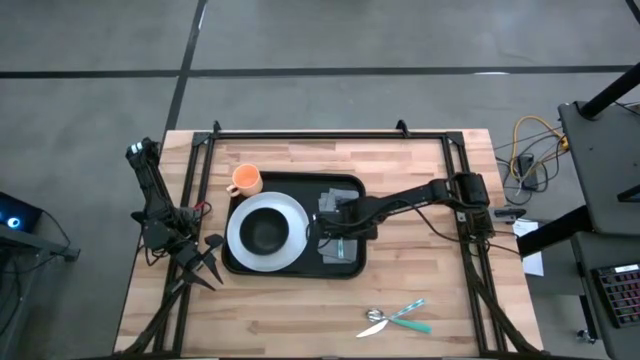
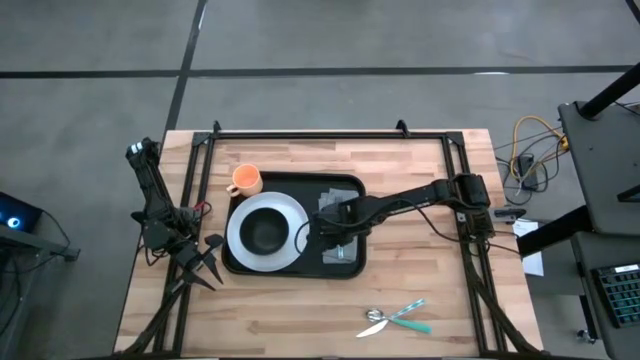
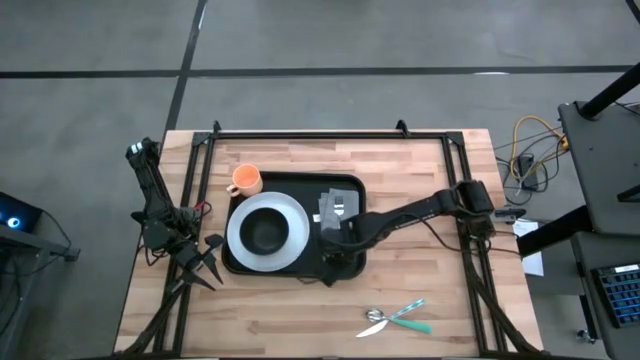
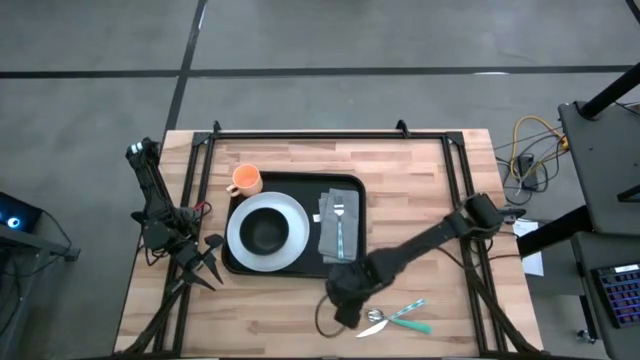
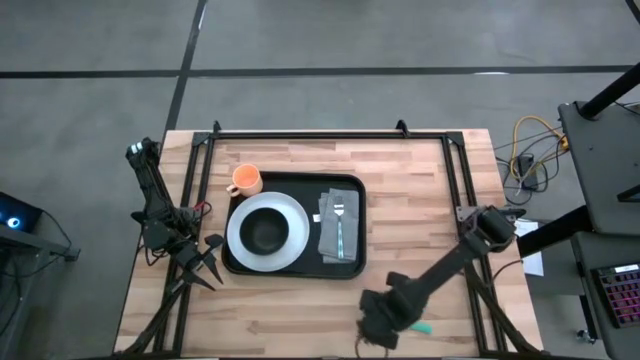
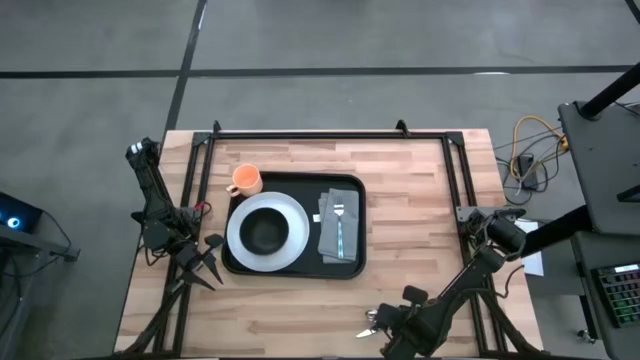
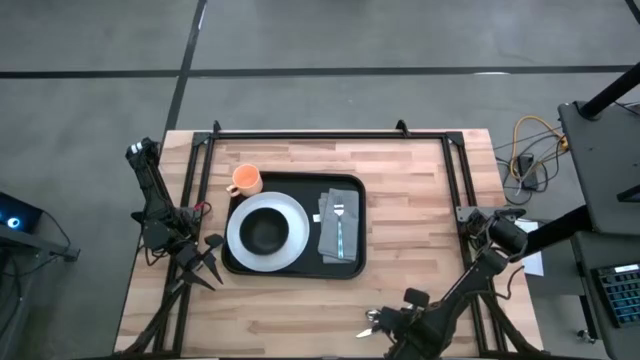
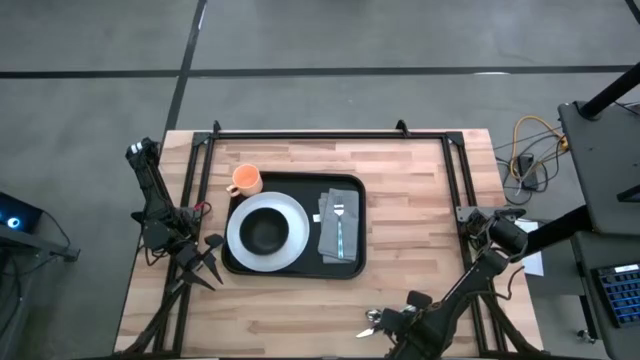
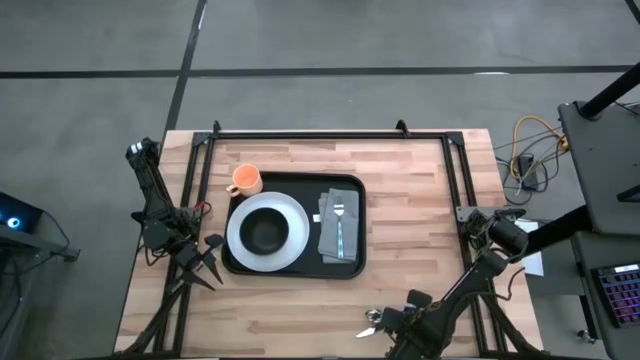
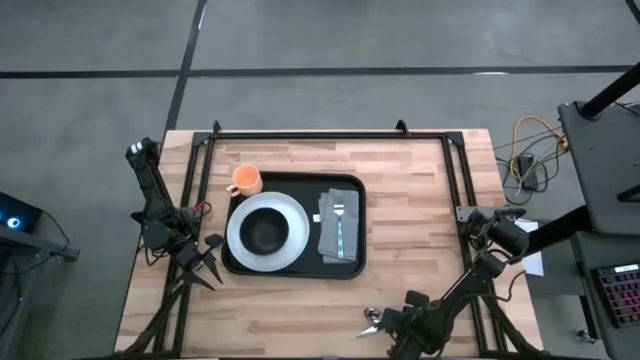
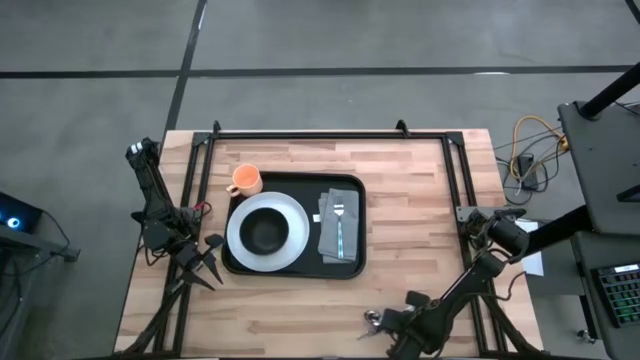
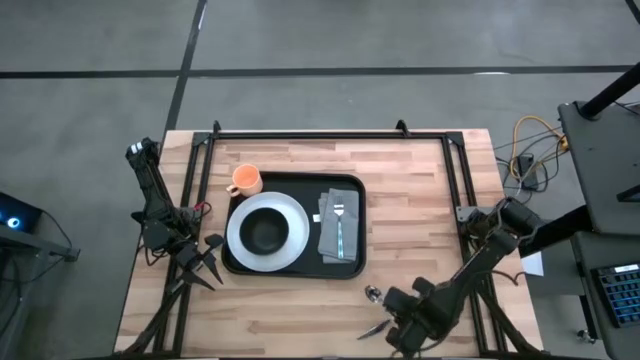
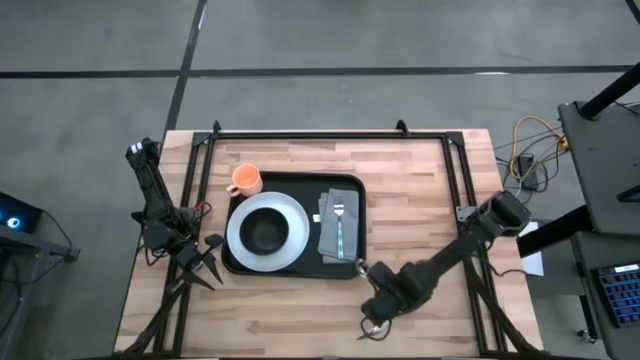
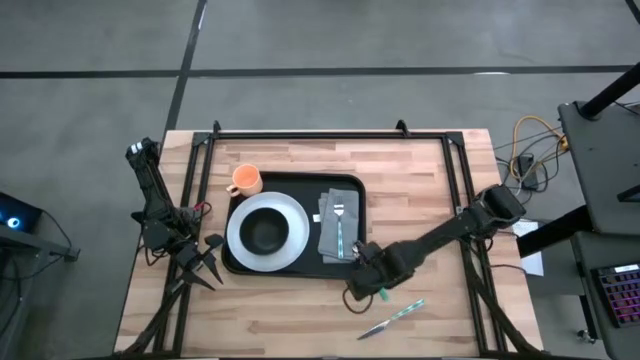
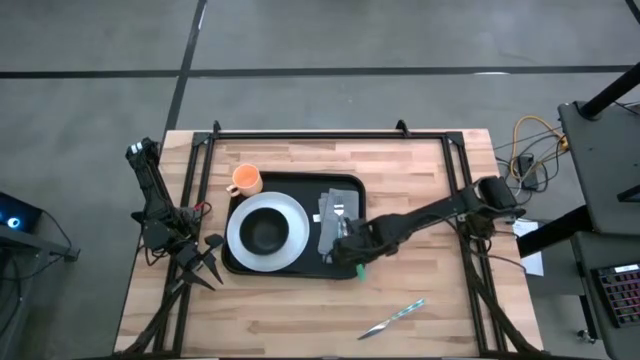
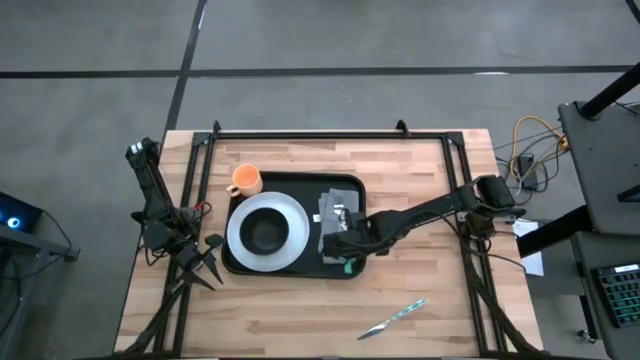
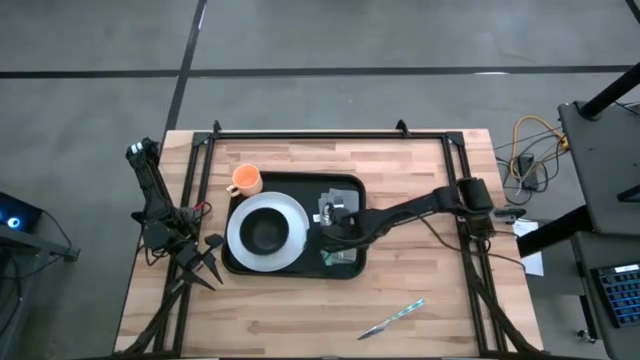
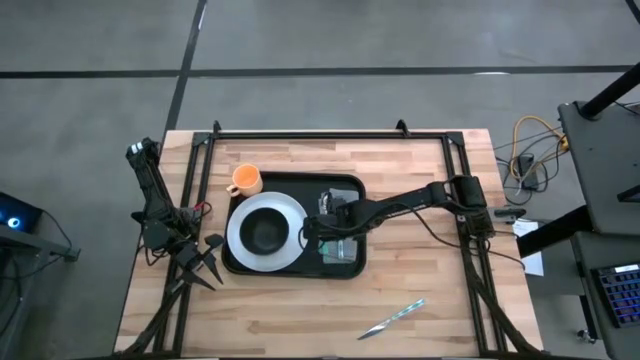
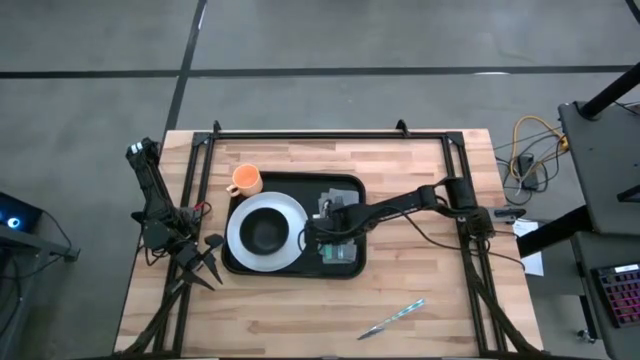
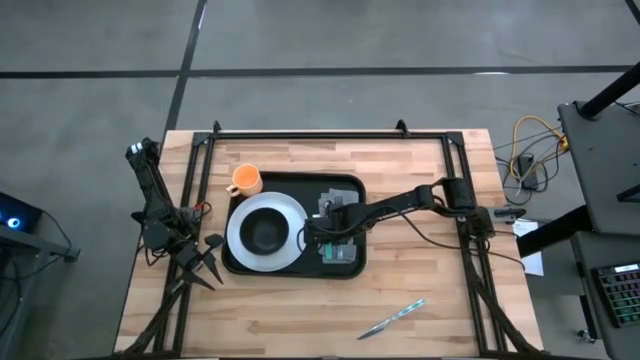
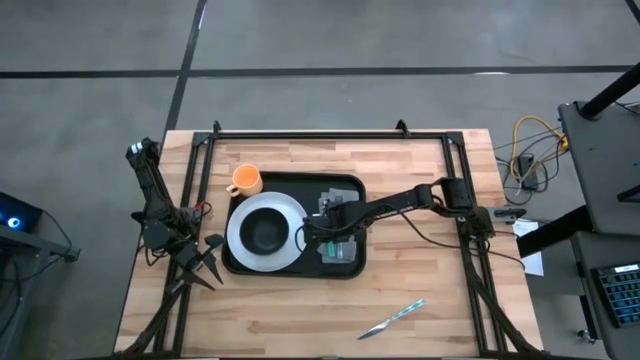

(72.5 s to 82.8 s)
Task: Set up tray
Put the blue spoon to the left of the blue patterned fork on the black serving tray

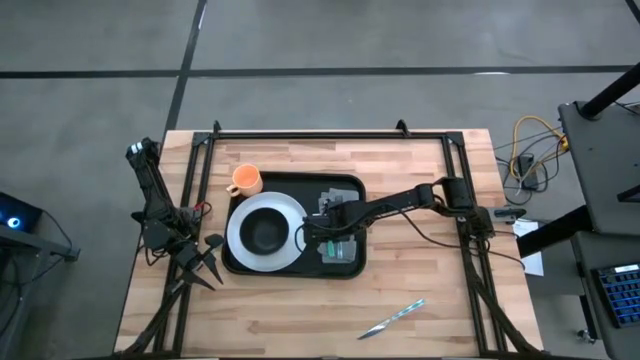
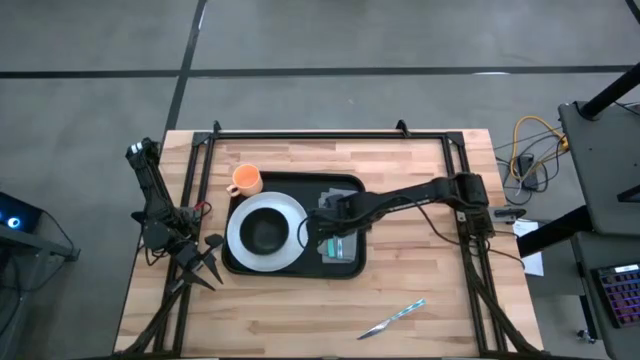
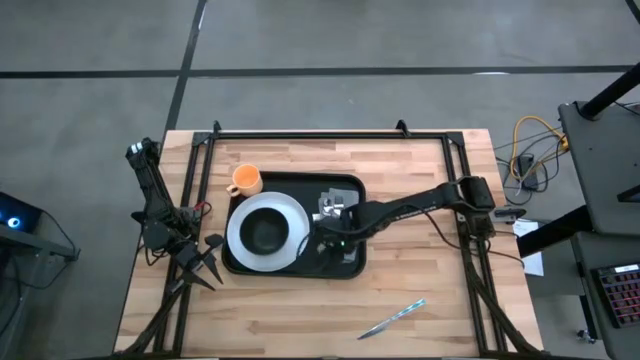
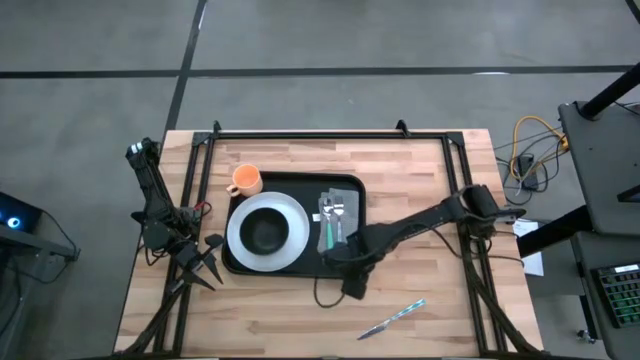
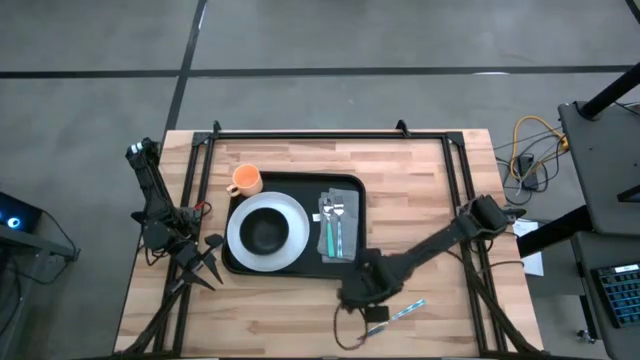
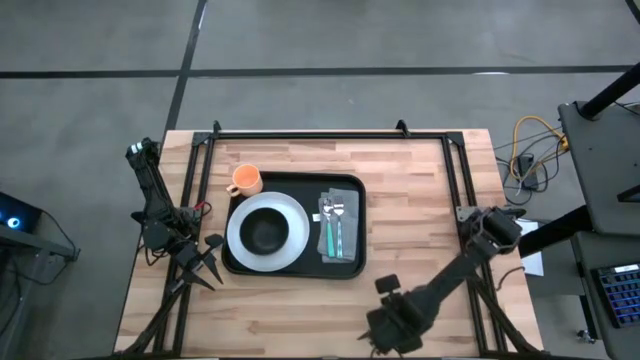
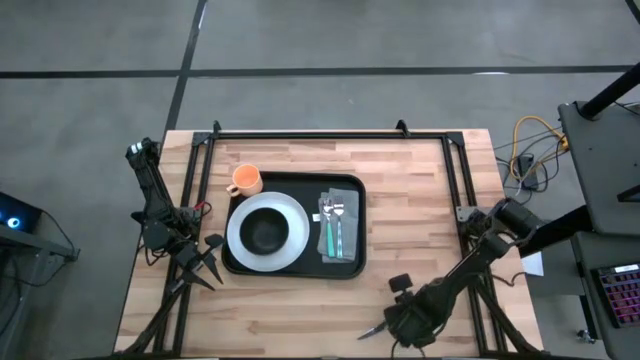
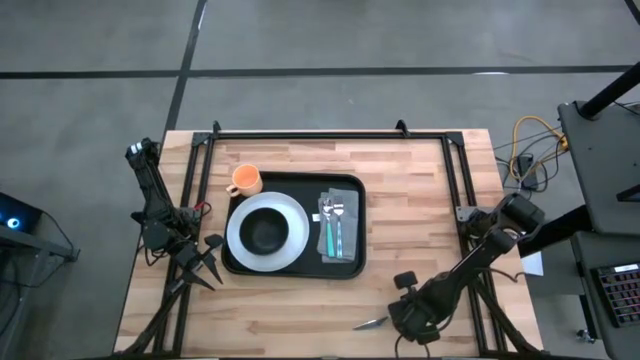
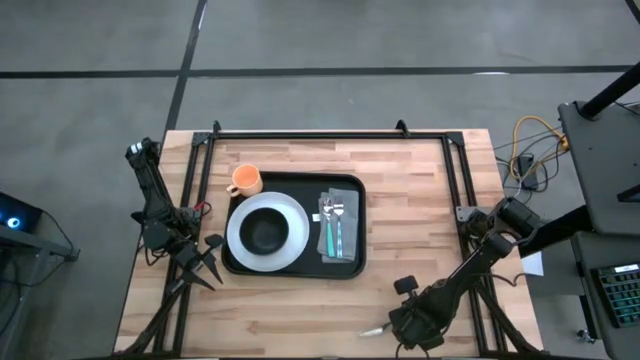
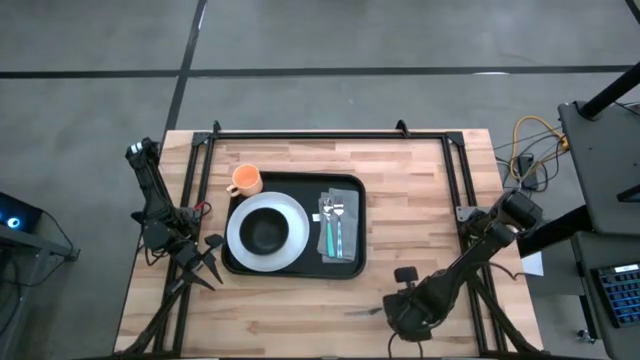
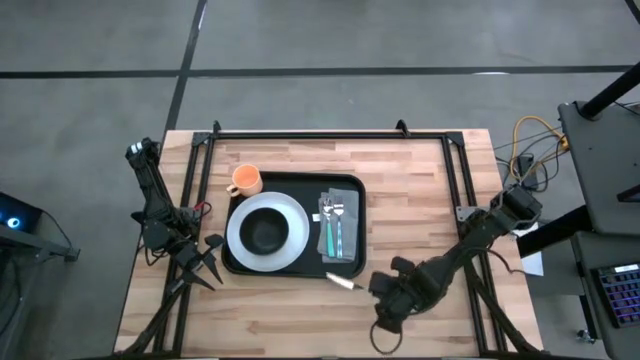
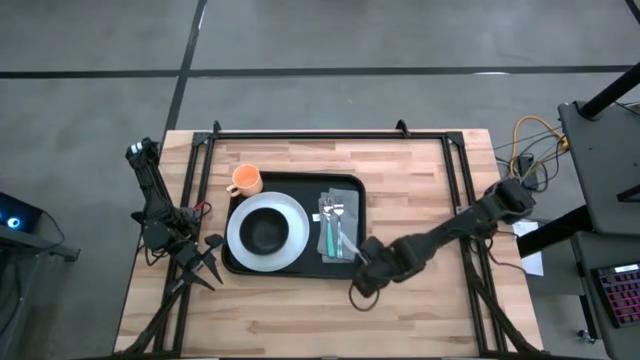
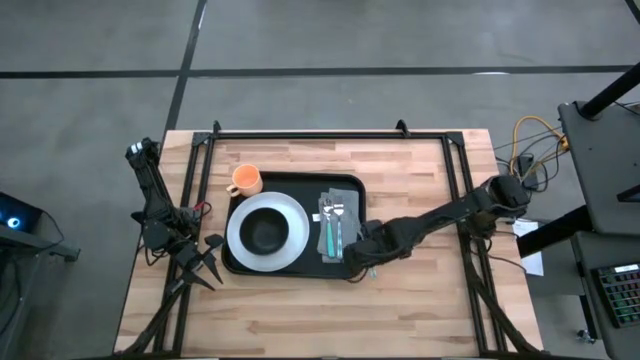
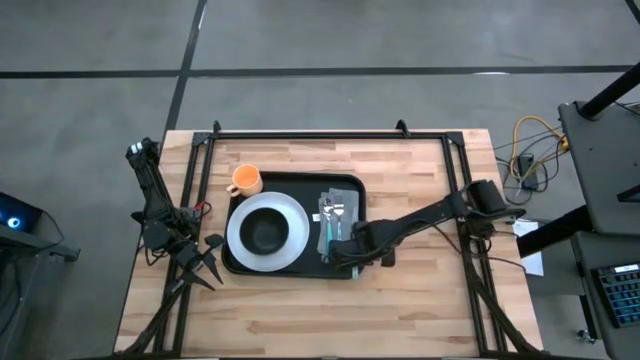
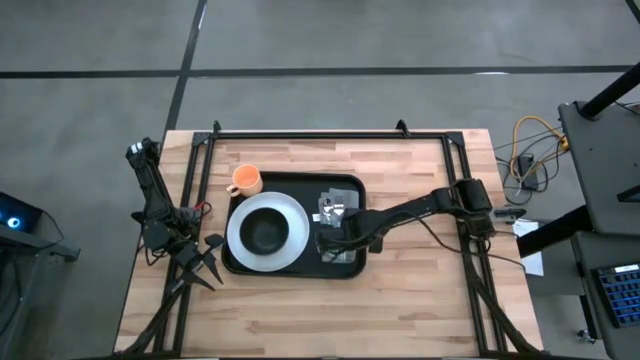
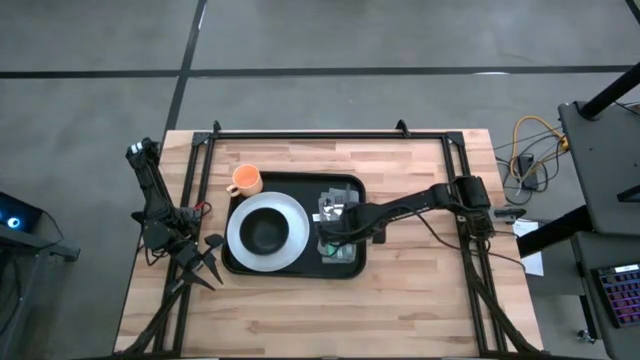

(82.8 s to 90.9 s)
Put the blue patterned knife to the right of the blue patterned fork on the black serving tray

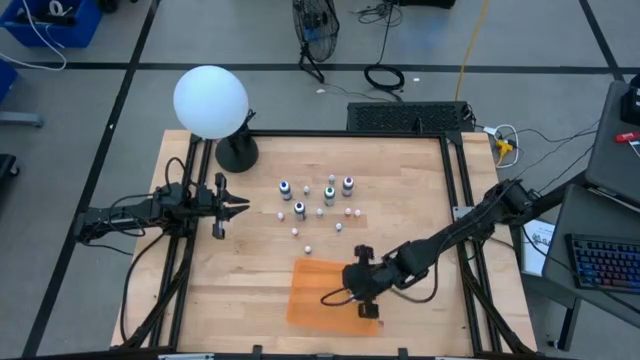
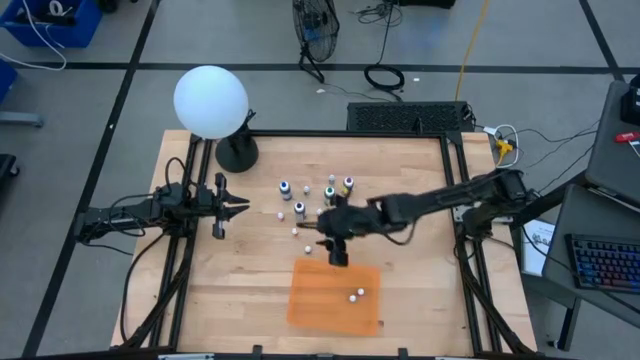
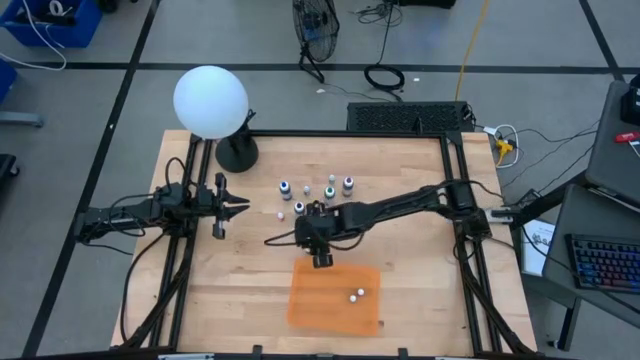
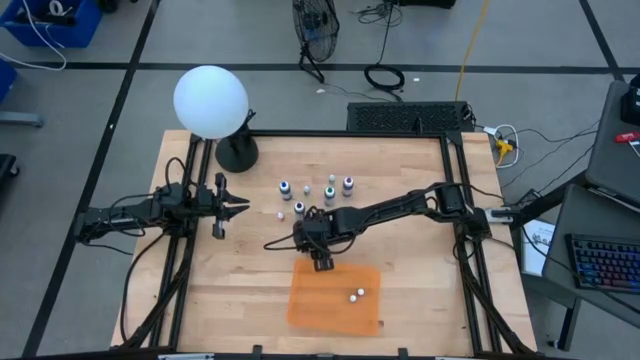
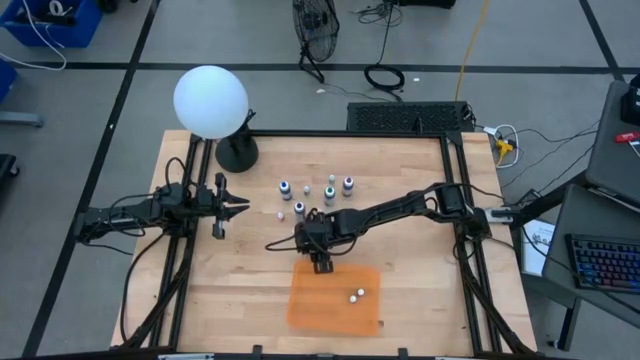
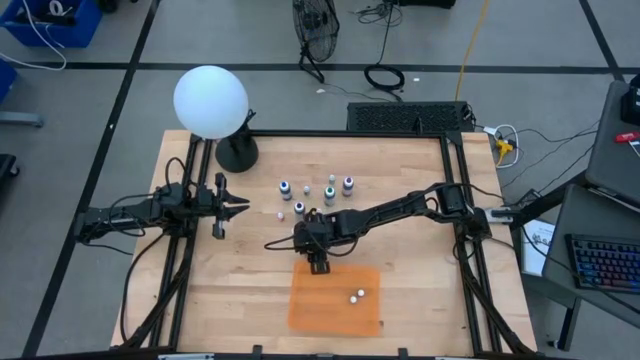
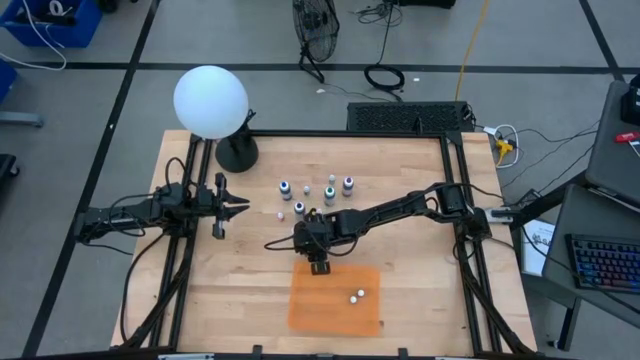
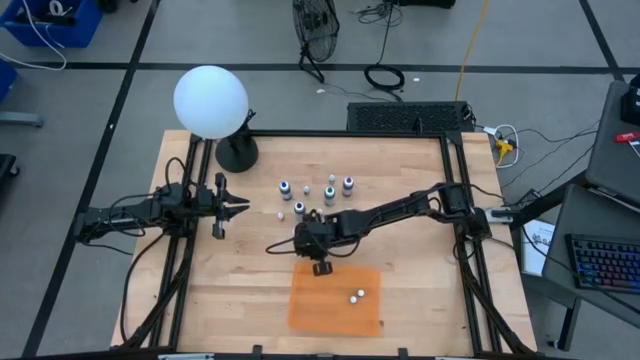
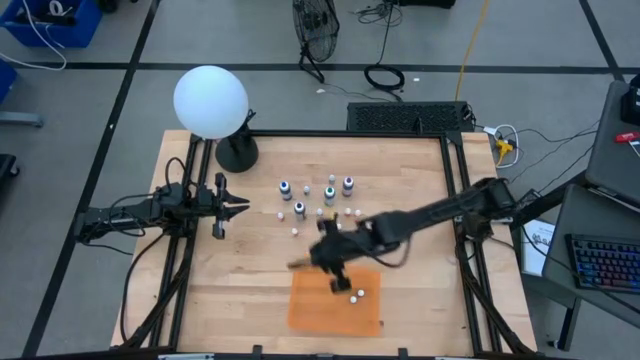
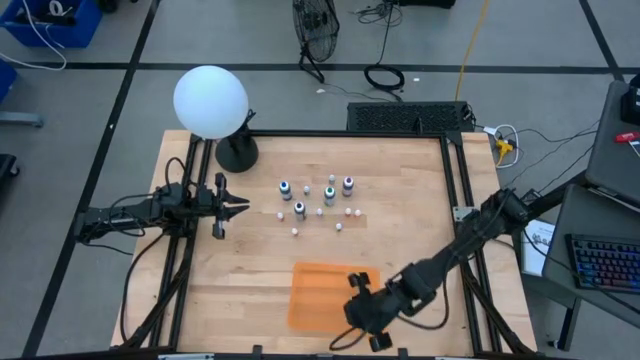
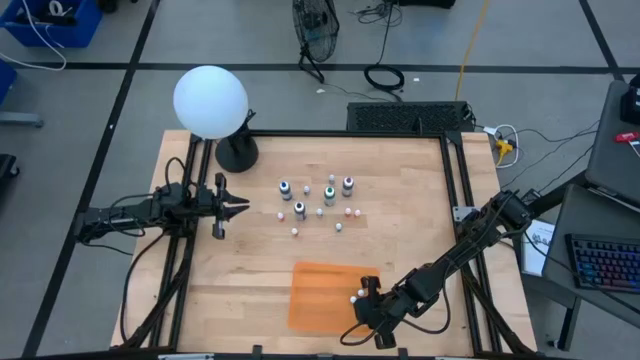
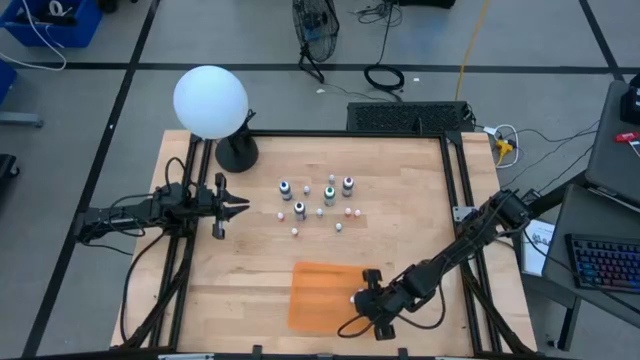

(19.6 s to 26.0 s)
Task: Pick & Place food coloring
Put the small purple food coloring bottle into the orange container
